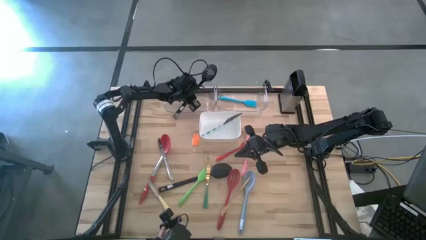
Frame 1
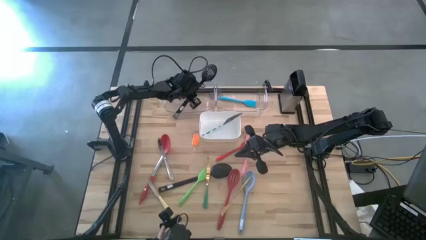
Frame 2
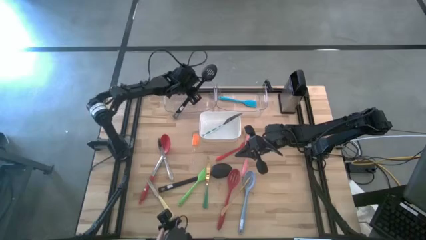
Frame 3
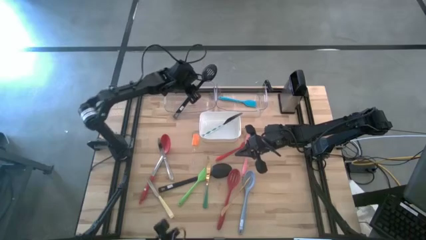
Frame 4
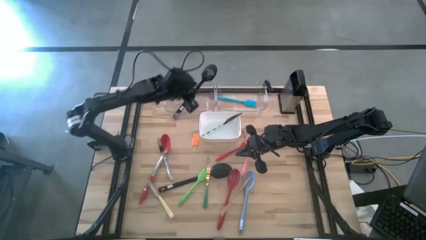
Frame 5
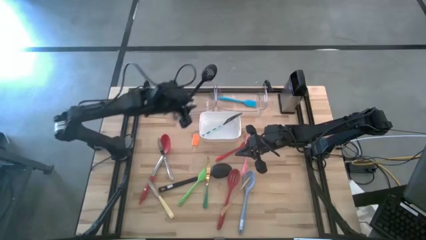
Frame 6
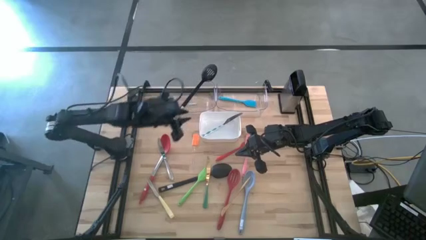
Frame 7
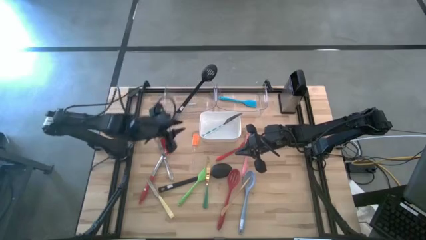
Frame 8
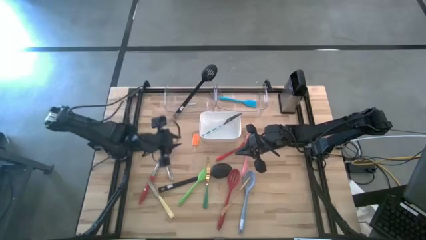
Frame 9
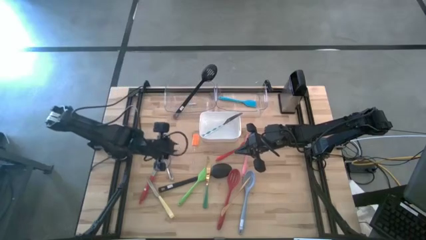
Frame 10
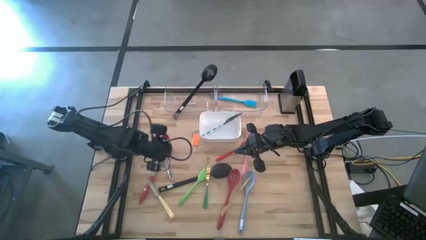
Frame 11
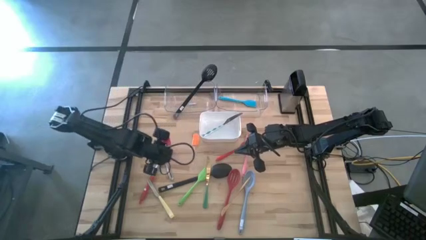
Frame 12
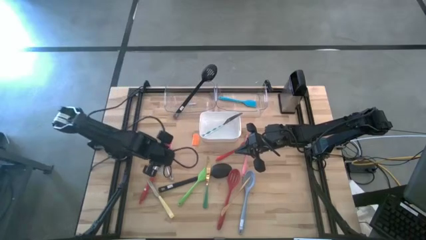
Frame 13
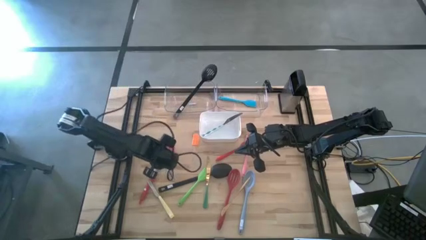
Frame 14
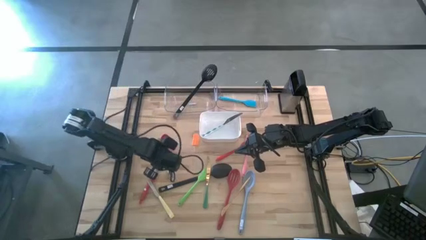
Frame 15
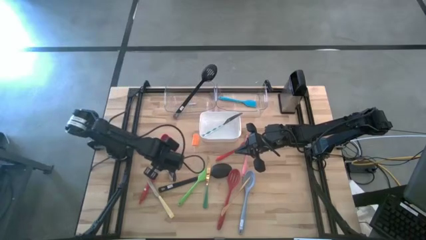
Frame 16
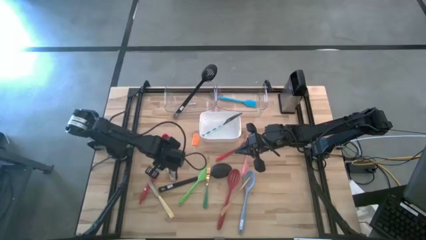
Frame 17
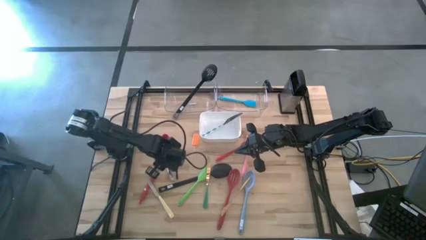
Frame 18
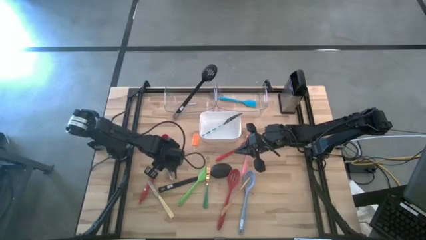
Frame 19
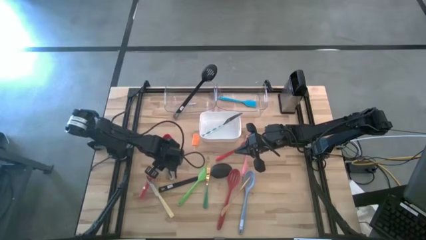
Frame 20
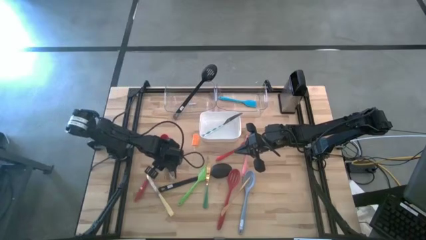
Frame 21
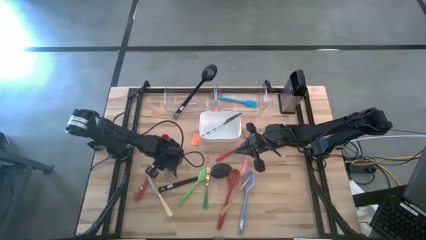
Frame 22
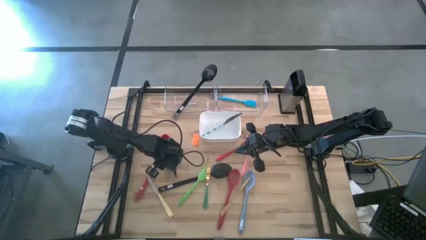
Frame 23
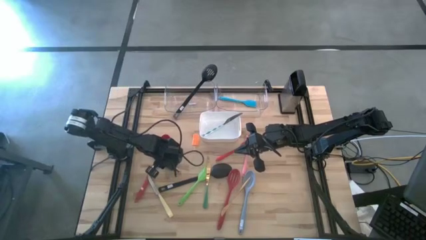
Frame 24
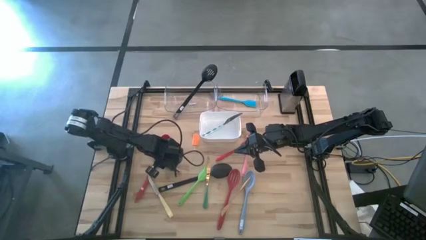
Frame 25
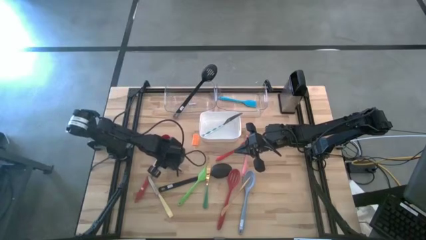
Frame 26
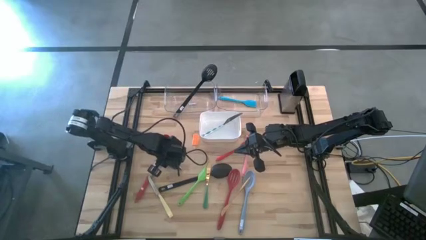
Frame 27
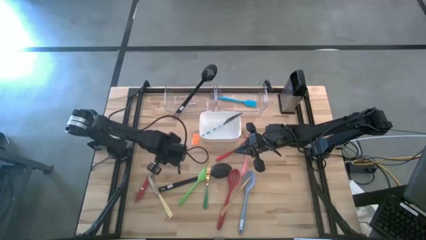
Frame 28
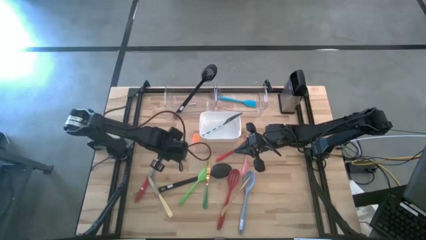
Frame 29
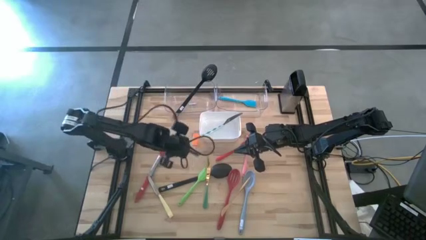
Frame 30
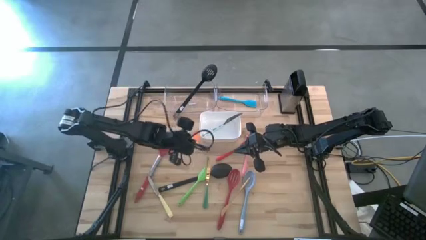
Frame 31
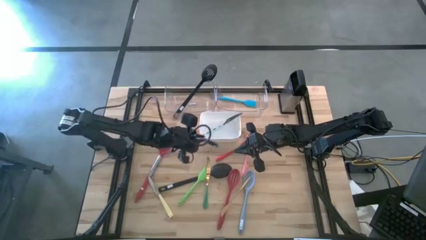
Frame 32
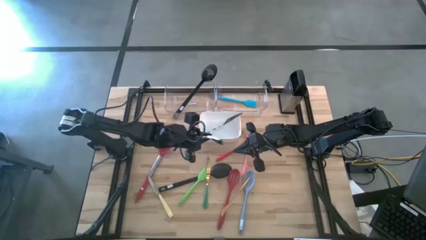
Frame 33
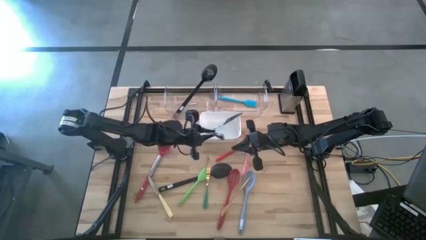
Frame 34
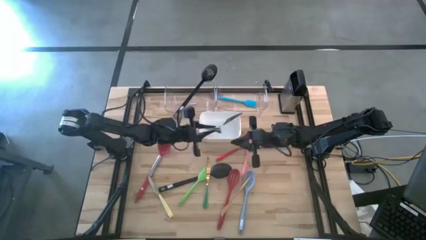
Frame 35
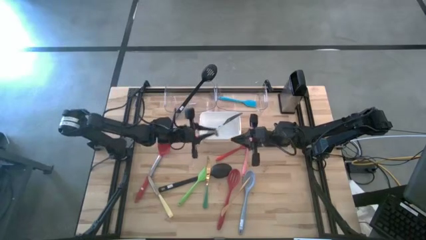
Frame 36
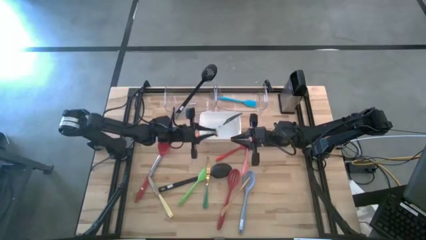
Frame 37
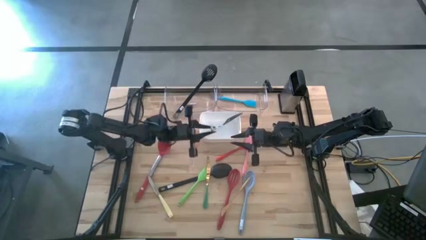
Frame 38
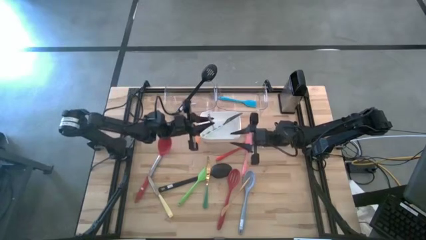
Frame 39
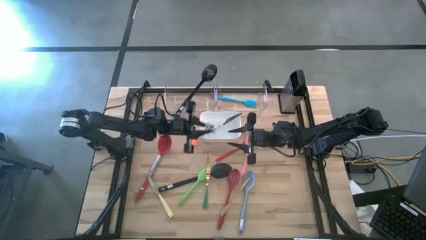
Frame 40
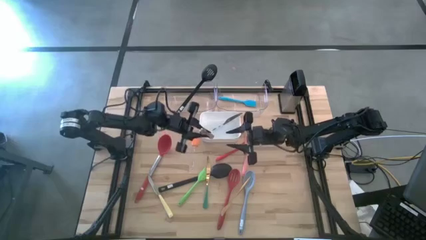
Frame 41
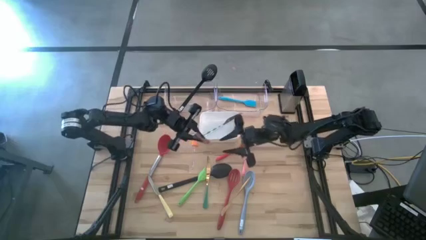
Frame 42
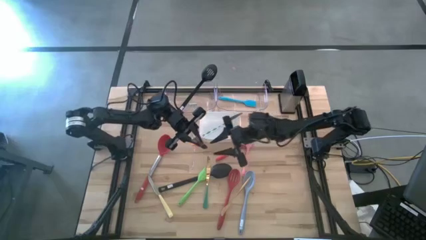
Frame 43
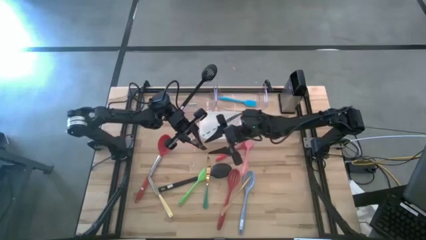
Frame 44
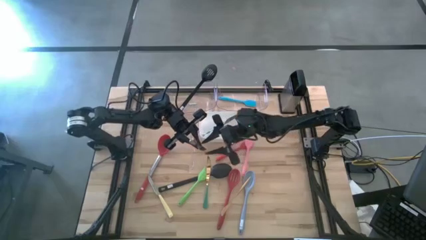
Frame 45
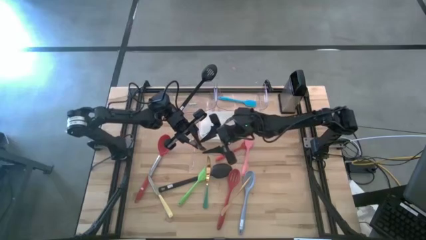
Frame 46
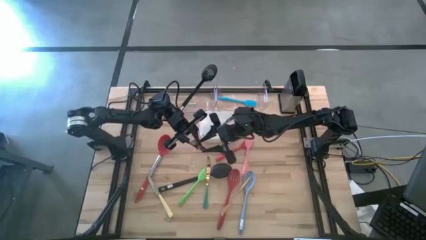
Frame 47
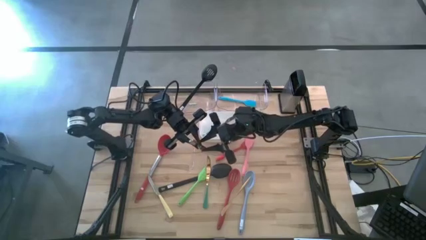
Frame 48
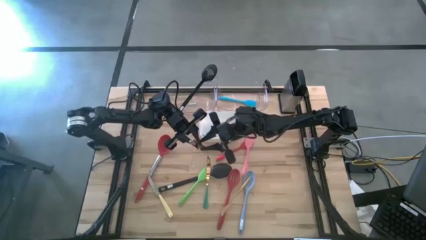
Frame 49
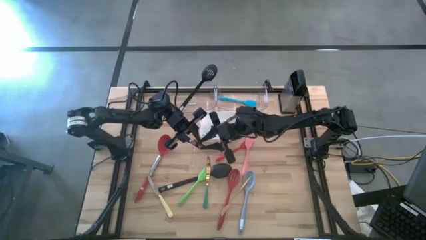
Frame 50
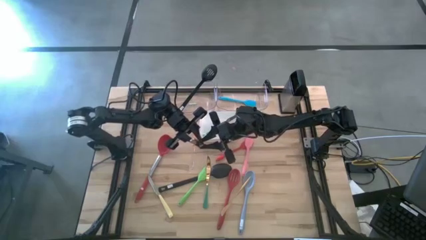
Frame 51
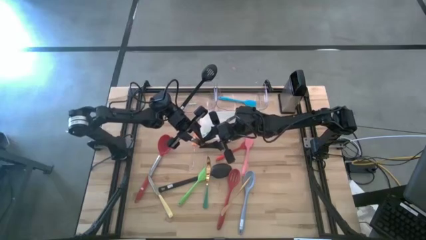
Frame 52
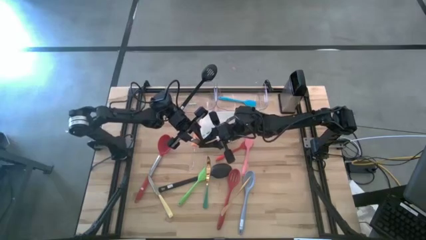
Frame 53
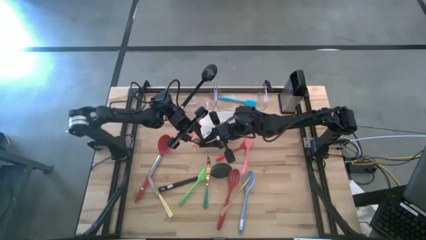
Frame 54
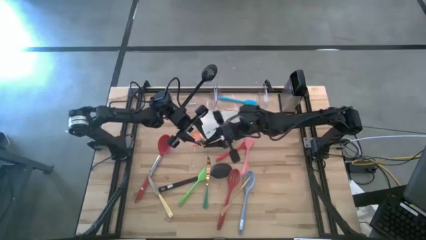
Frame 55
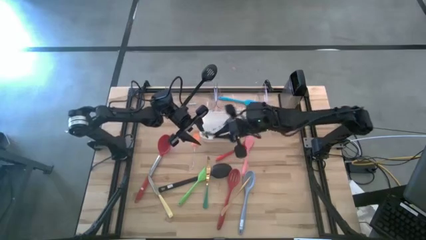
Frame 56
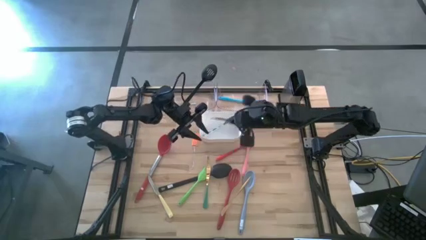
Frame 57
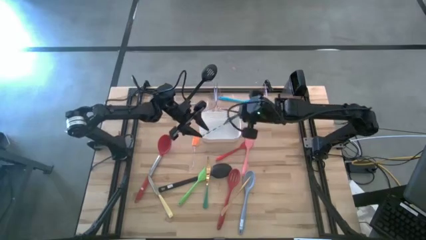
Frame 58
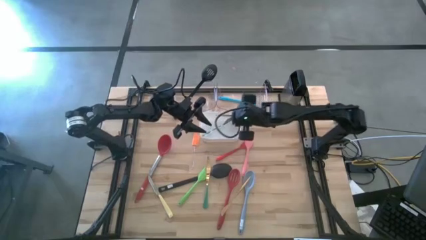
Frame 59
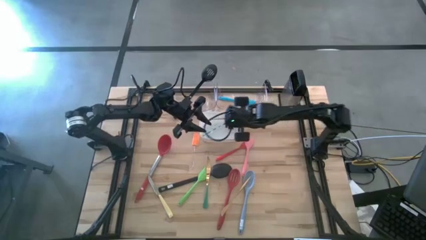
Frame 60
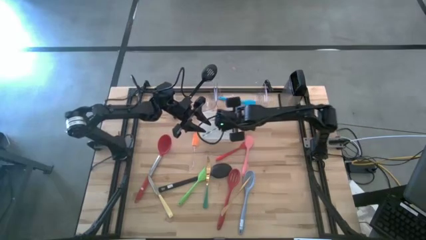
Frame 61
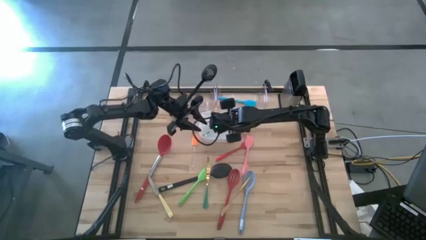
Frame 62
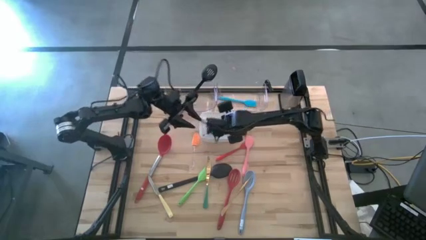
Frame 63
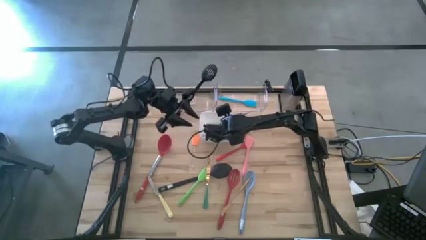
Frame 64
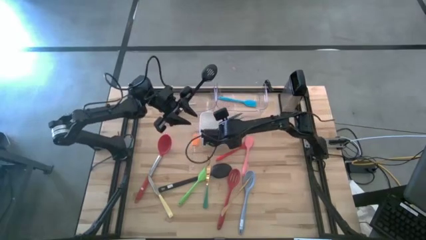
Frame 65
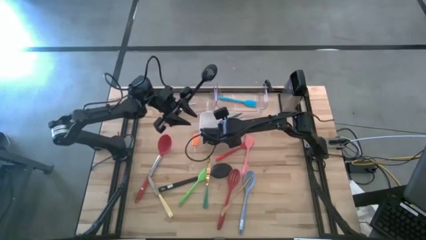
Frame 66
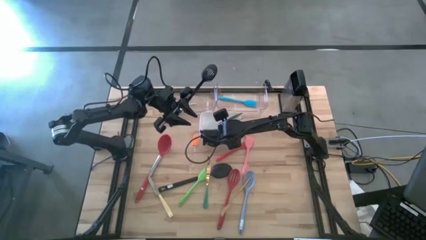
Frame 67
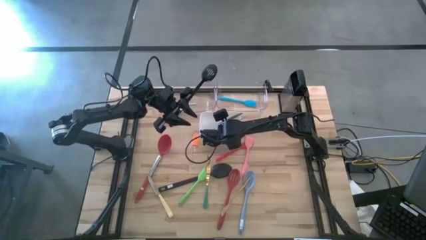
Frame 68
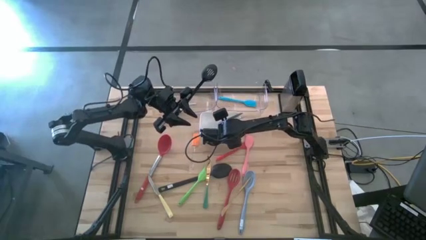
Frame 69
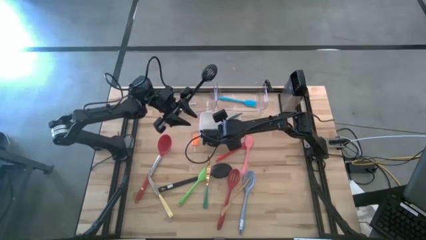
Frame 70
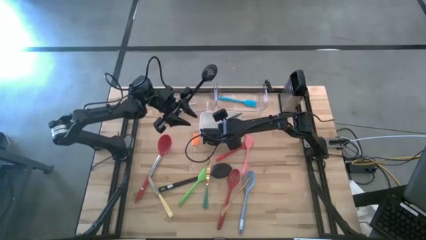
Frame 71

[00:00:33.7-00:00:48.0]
Task: Pick & Place Kitchen Items
Put the silver table knife into the white bin

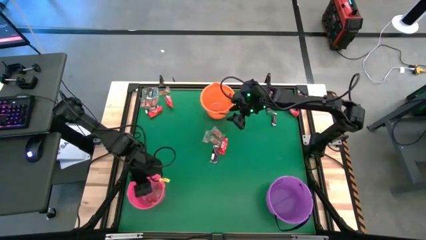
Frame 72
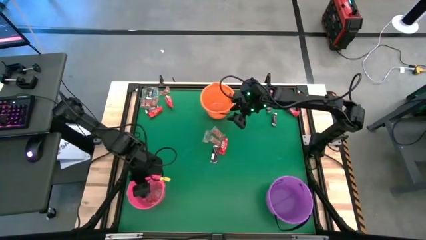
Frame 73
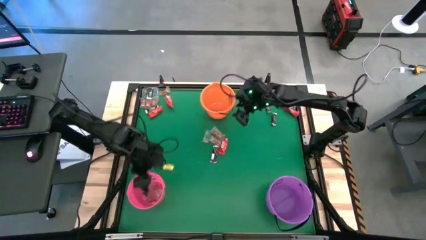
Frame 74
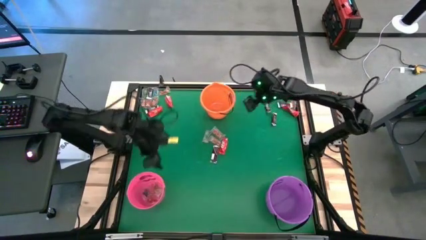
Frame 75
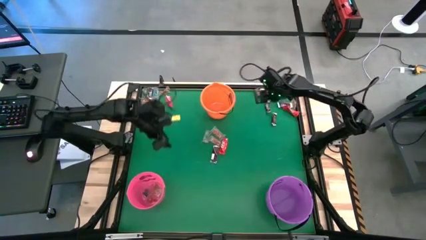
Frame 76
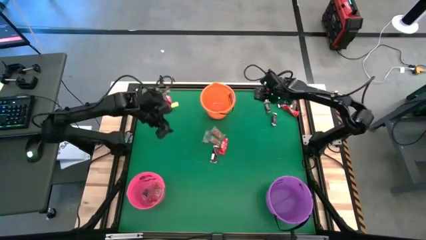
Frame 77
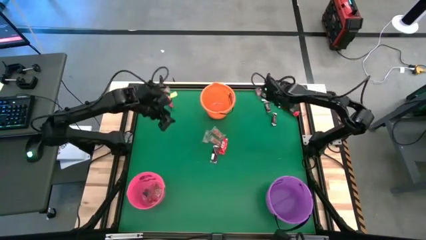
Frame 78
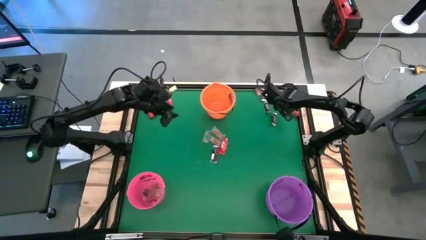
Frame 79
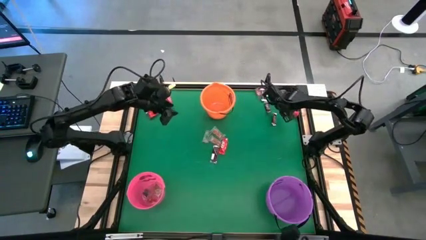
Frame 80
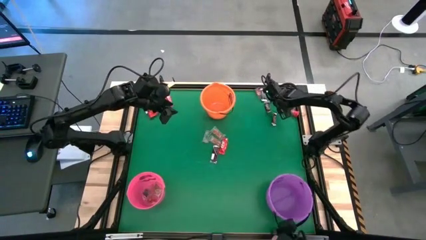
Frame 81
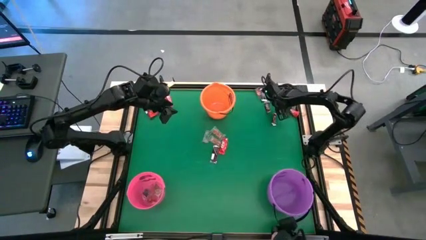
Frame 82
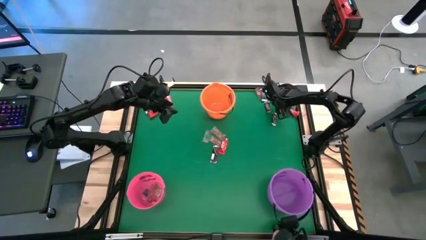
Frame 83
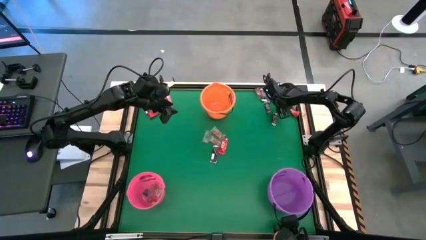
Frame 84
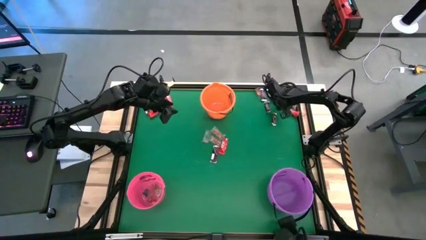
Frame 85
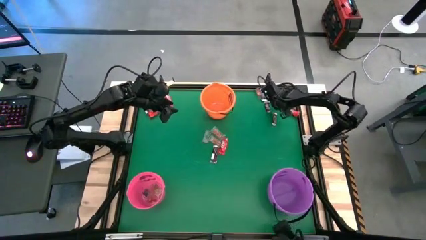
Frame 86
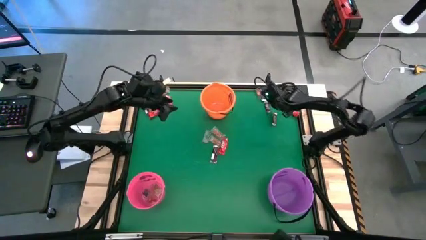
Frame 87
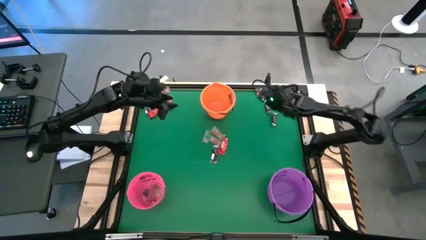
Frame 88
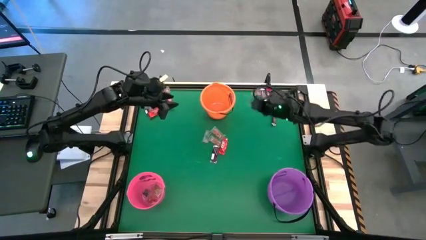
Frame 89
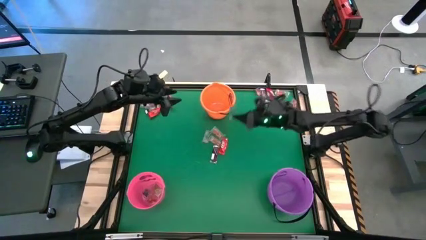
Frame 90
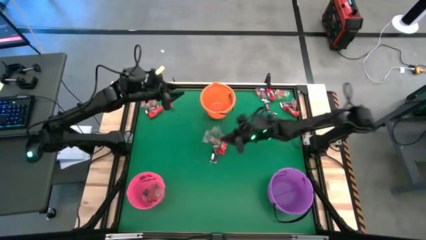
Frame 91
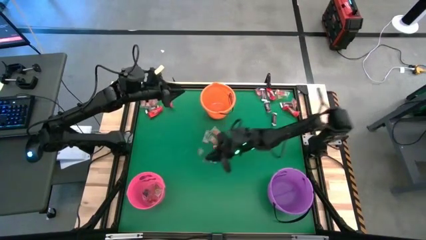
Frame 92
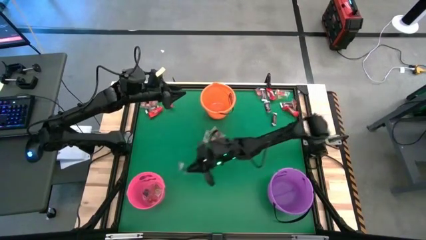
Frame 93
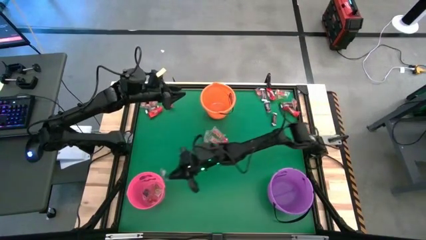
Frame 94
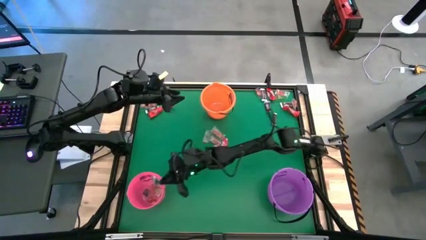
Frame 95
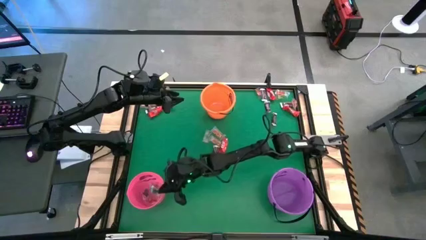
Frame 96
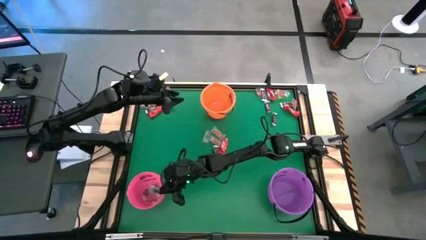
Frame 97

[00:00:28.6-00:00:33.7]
Task: Sort candy by brand, put in halloween buckets
Put the blue gummy into the pink bucket
